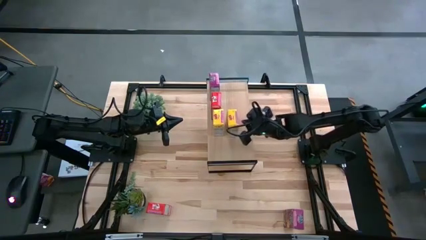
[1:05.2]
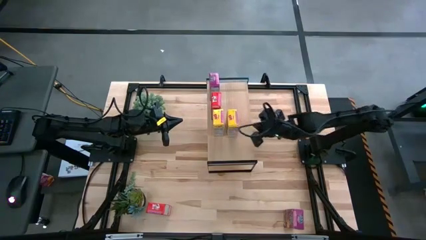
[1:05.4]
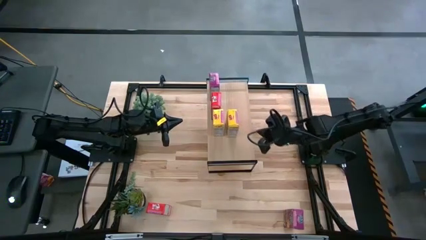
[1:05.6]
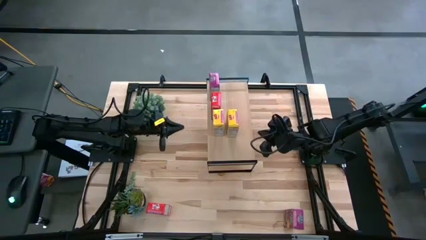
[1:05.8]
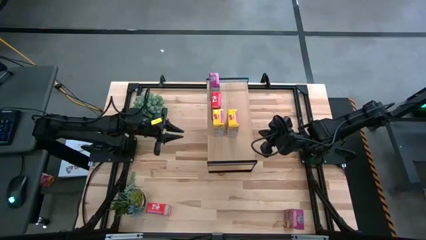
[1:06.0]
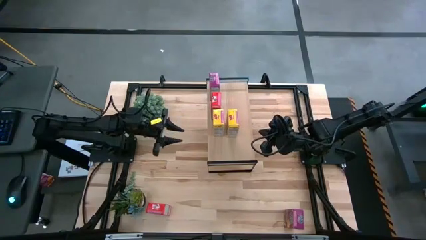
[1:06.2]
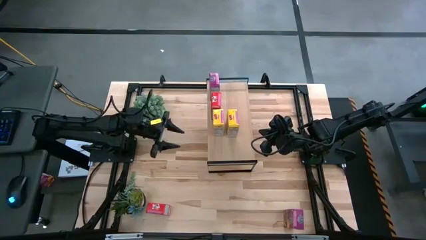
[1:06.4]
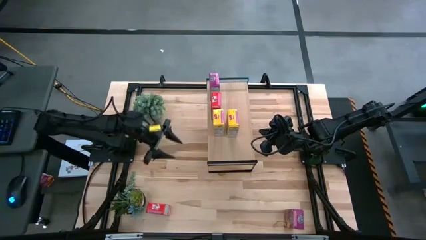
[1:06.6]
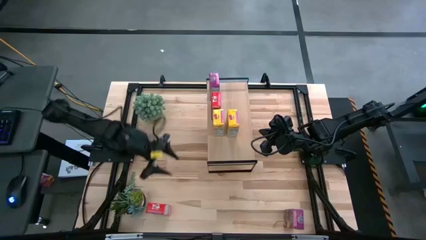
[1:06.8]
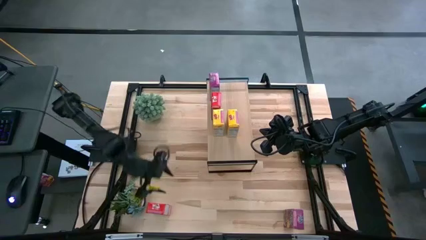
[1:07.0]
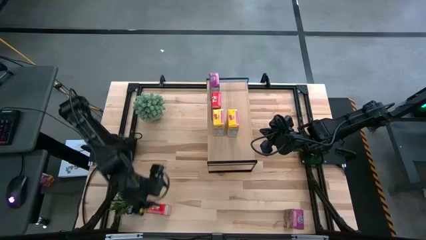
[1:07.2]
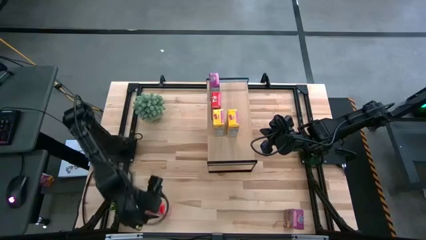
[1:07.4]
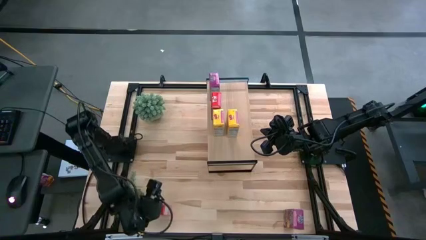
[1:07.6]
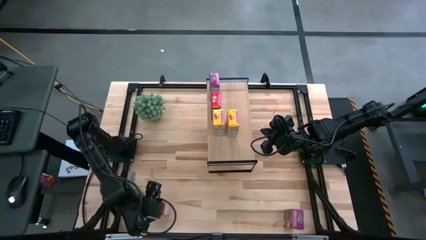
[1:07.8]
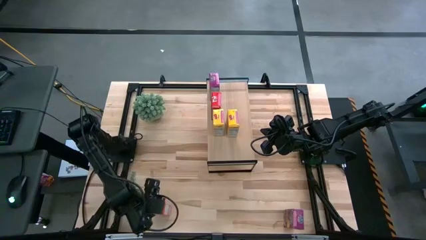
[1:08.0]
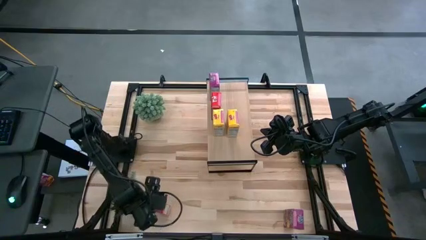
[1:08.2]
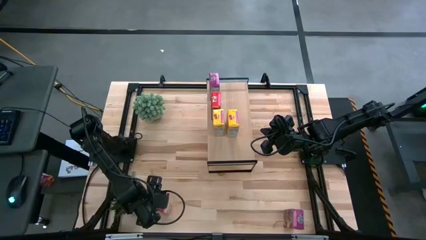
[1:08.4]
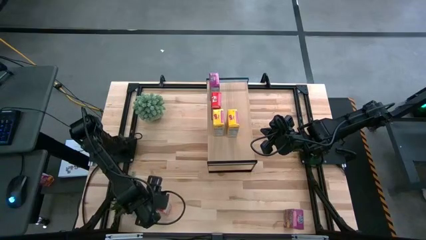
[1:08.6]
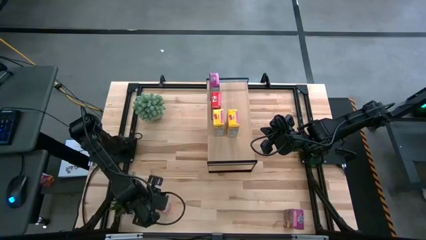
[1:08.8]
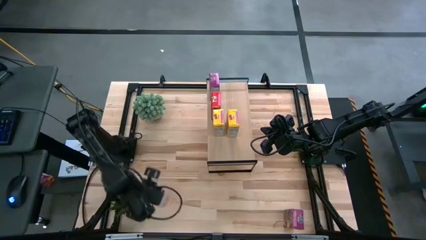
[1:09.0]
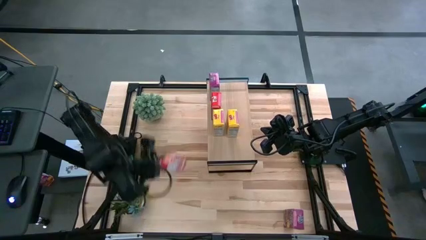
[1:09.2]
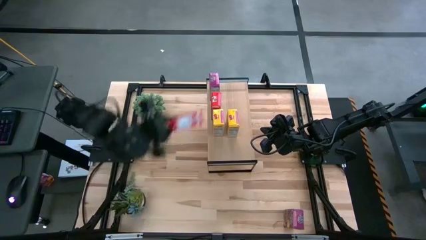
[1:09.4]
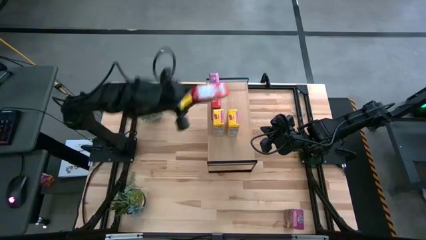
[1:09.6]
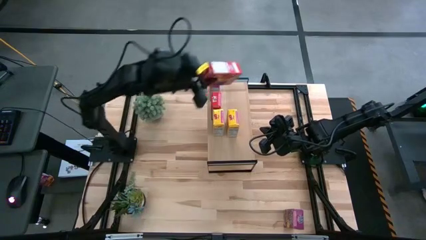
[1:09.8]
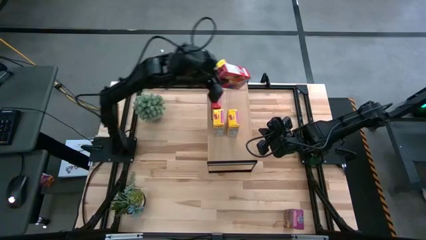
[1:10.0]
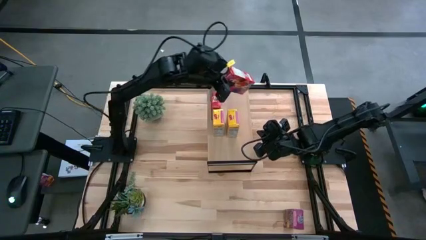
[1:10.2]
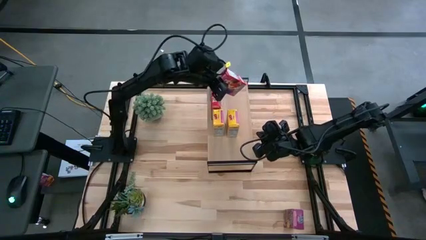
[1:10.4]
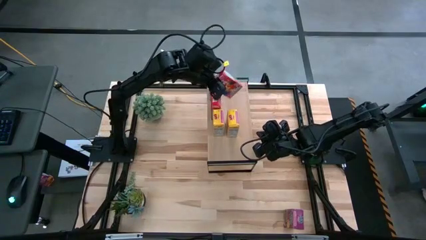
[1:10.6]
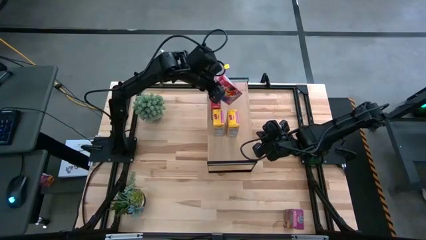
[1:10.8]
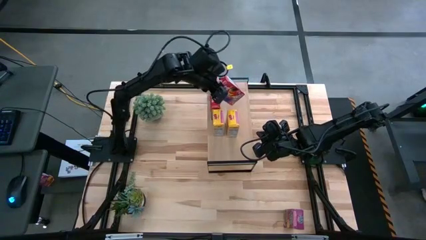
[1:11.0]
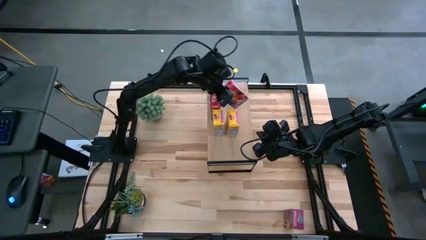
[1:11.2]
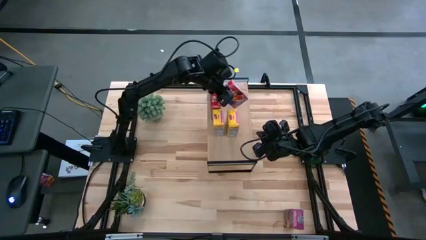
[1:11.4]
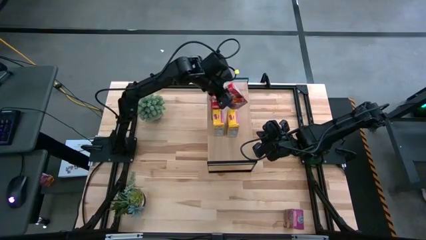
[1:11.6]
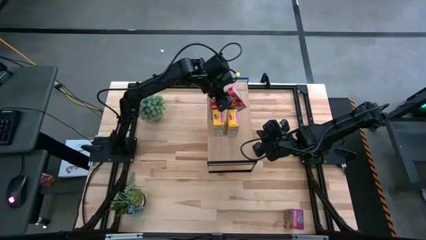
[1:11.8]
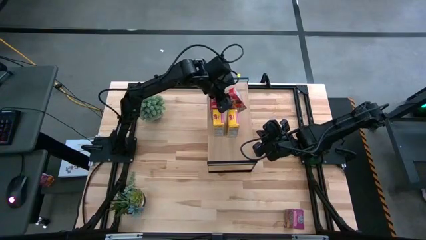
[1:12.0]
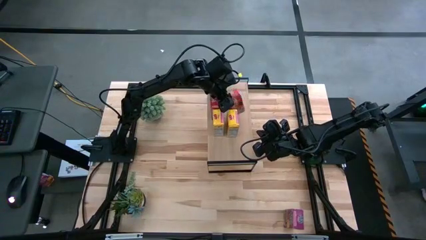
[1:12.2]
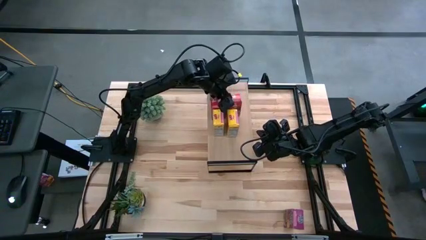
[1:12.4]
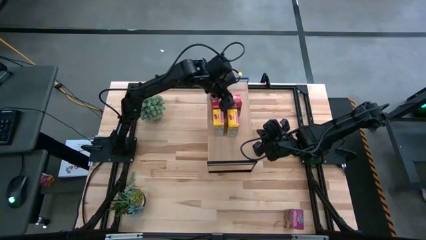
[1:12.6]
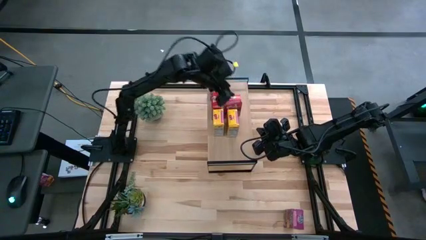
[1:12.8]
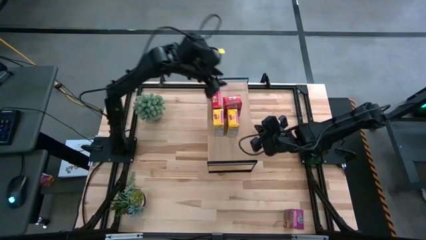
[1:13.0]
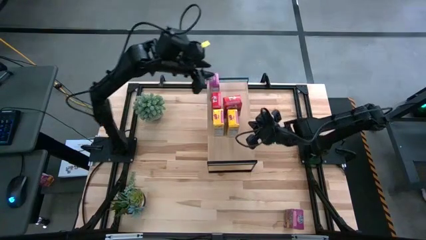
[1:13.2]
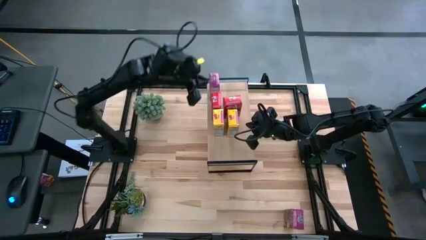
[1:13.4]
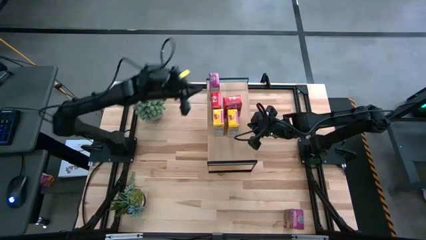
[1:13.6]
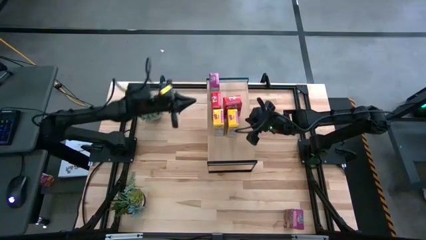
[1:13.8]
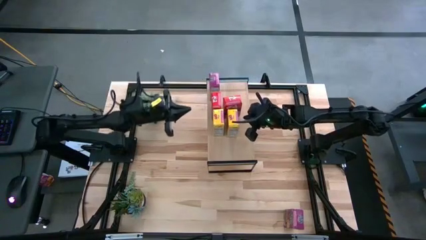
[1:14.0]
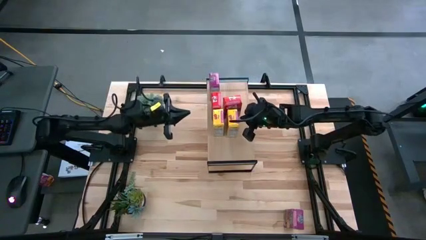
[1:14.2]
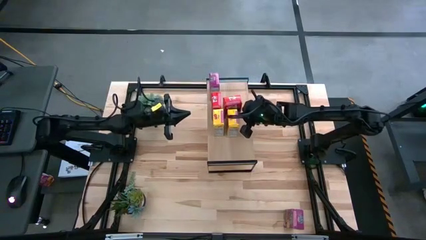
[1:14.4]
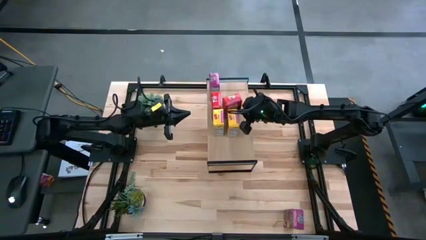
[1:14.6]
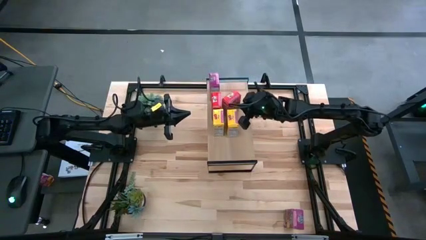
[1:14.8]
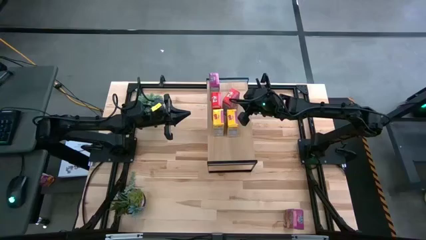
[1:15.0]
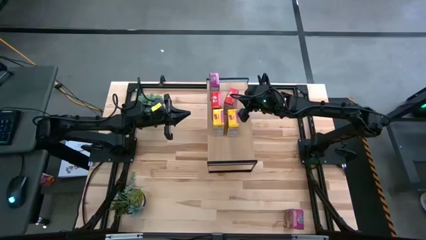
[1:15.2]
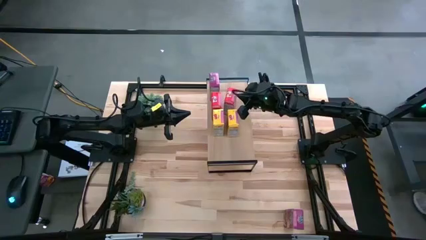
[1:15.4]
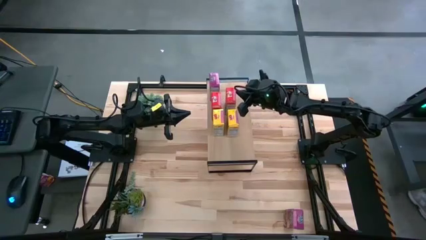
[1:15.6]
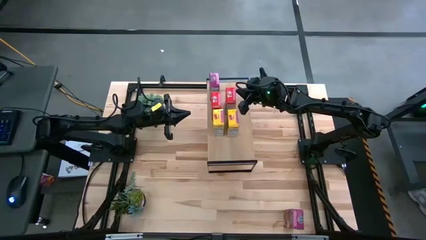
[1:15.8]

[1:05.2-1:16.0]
Task: Stack cereal on shelf
Put the red cereal box aligned with the other red cereal box on the shelf
